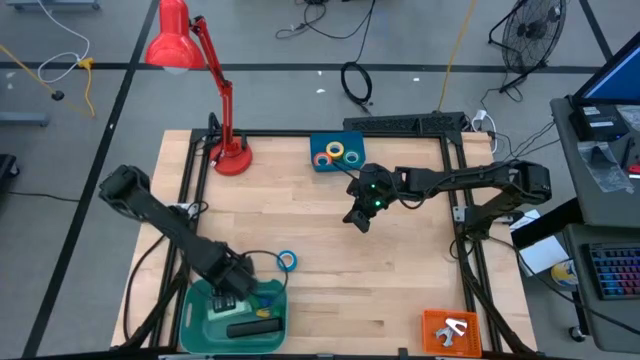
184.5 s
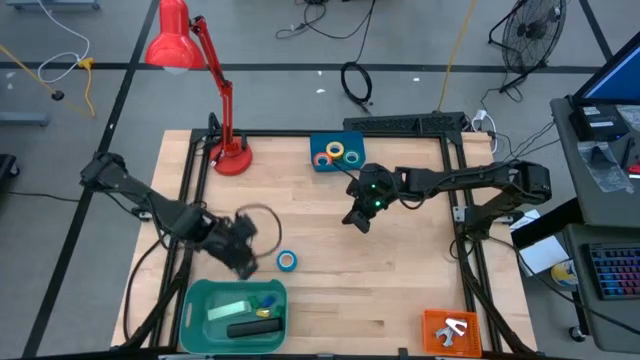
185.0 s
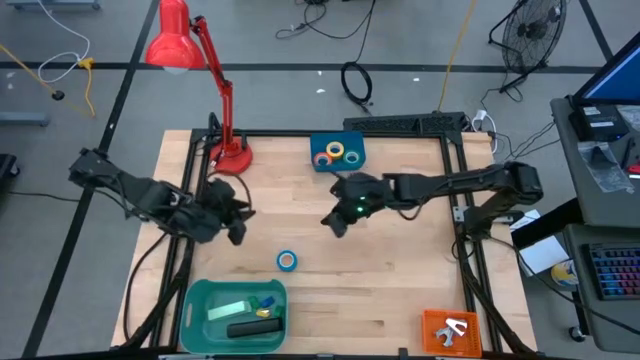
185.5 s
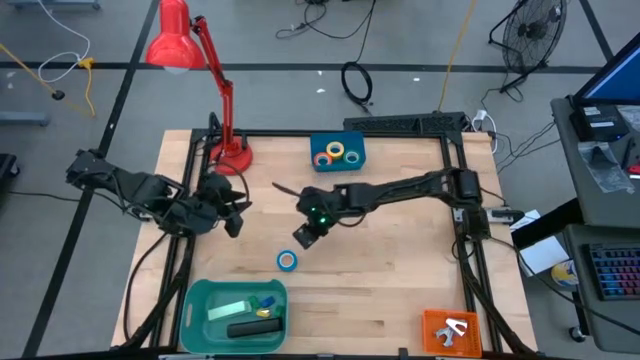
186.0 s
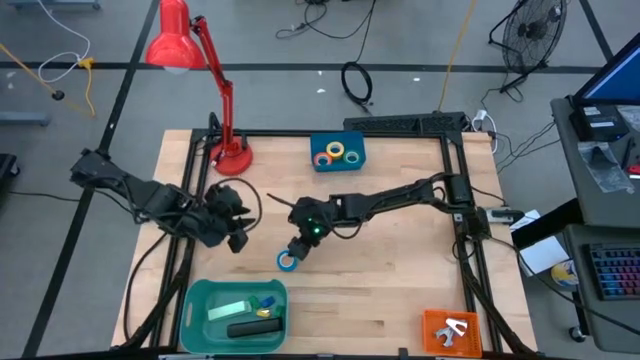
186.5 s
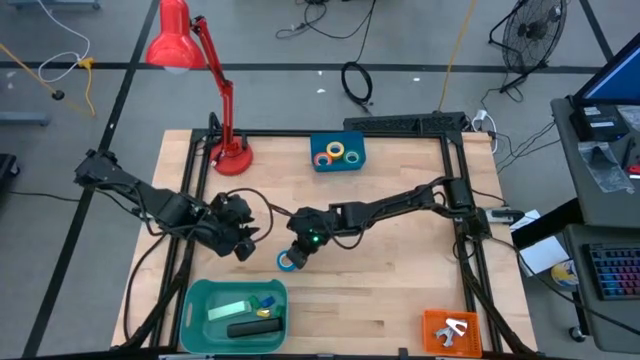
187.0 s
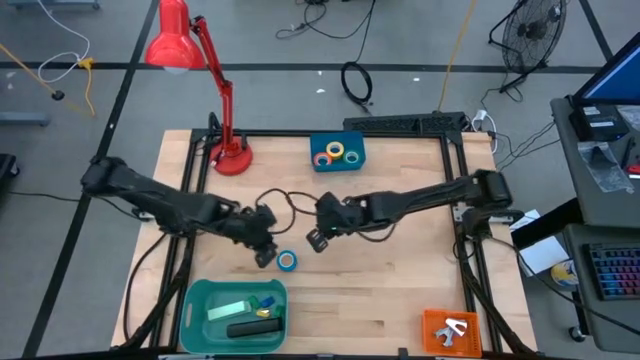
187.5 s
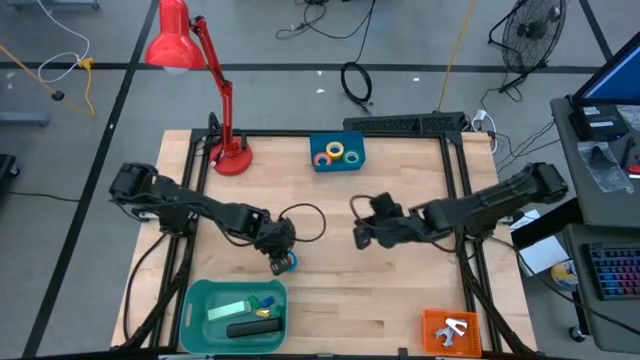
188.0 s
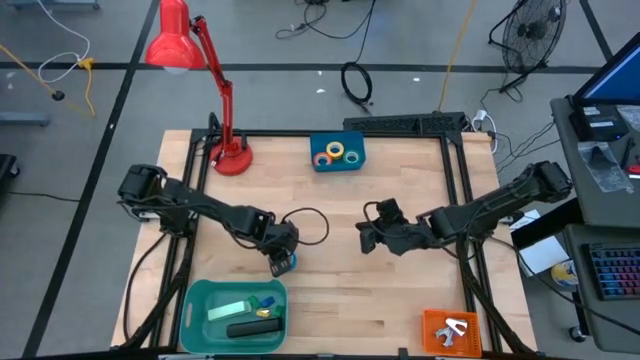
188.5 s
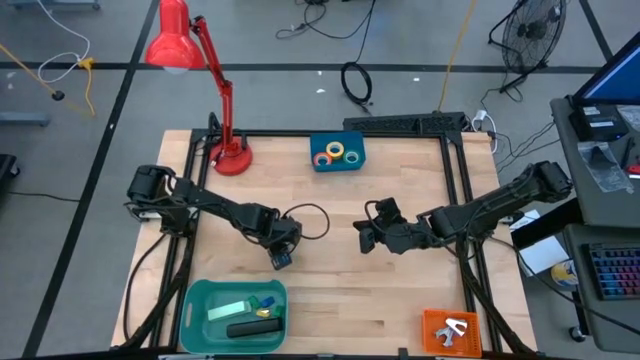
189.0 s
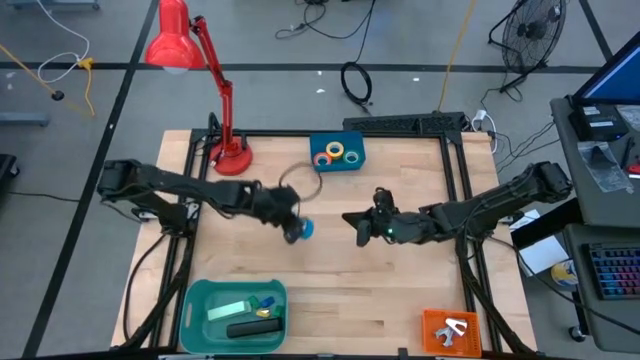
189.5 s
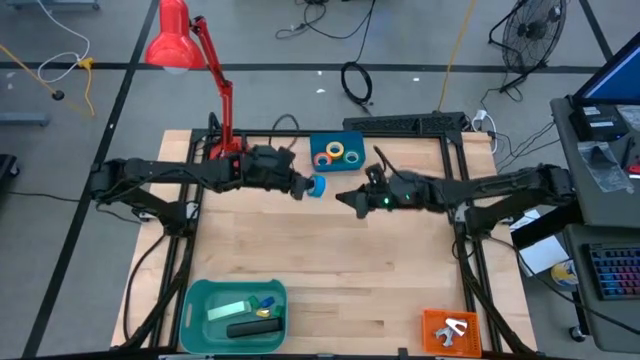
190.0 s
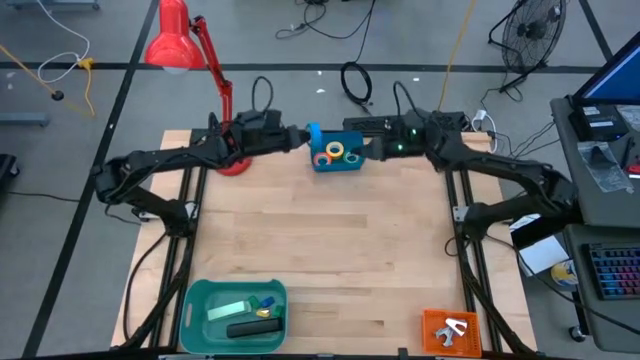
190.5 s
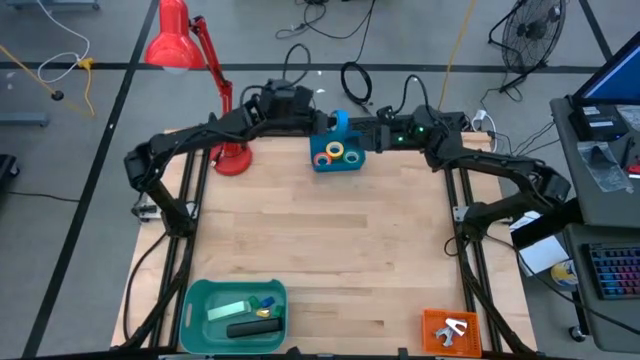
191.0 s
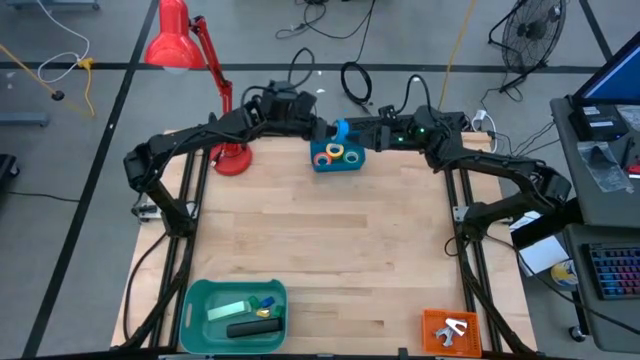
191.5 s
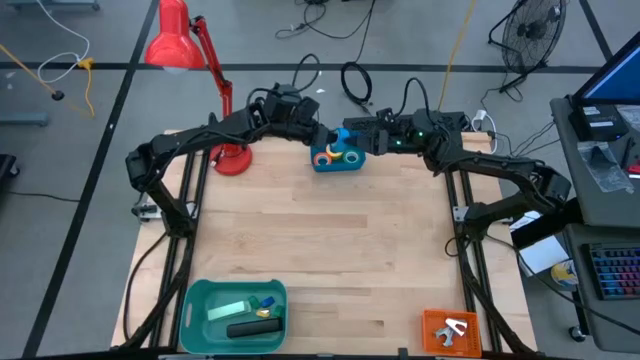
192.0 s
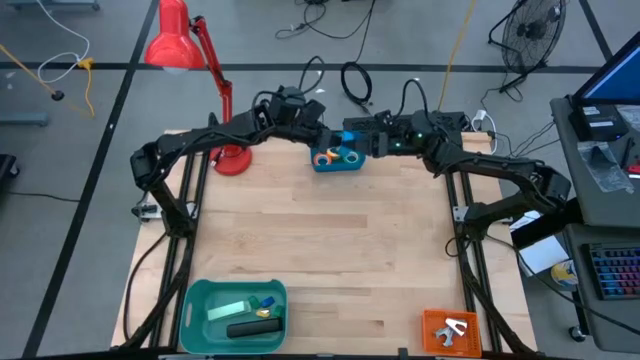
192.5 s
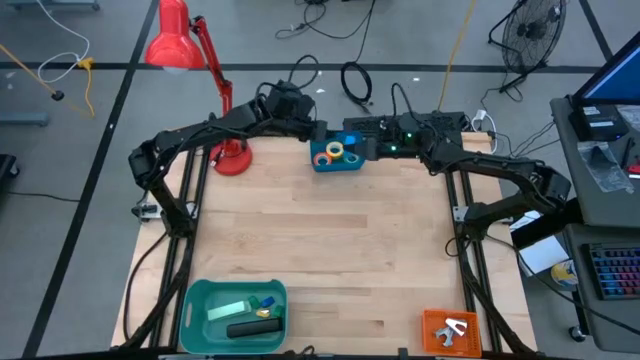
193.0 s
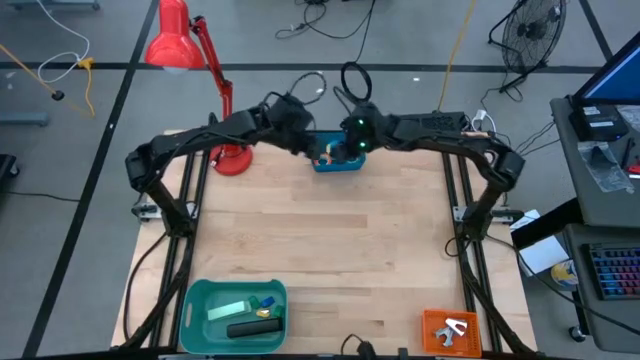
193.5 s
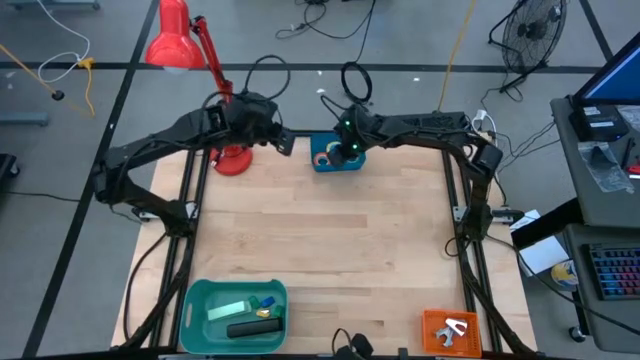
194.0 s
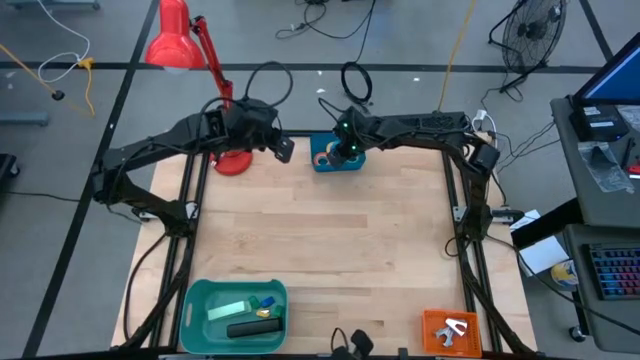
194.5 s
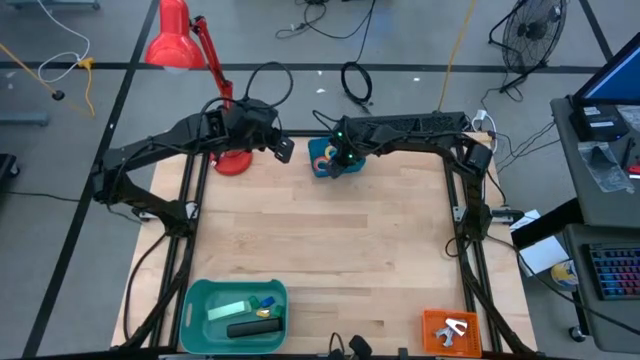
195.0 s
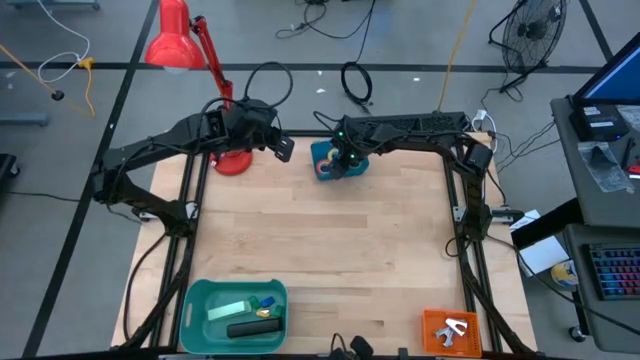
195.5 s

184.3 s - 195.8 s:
Task: Pick and place Stapler, Stapler remover, tape
Put the blue tape into the blue bin

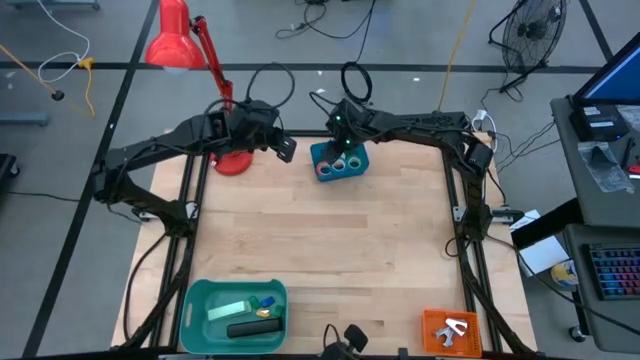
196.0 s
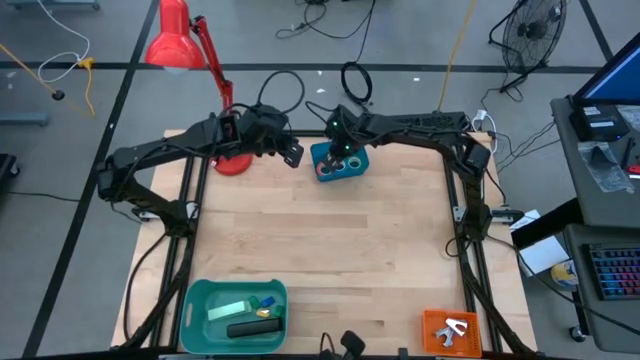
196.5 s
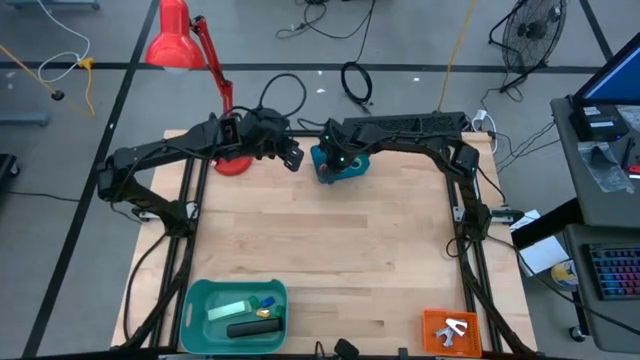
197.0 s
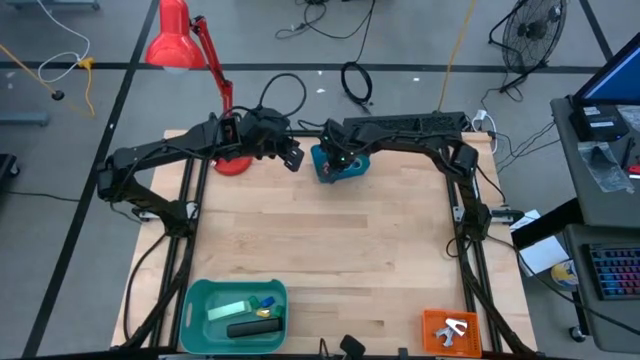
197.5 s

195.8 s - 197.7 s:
Adjust the tapes on the bin

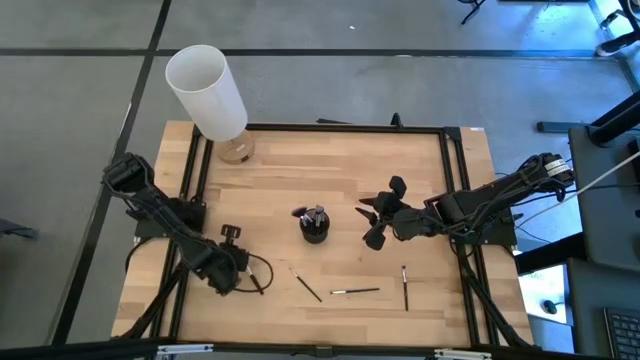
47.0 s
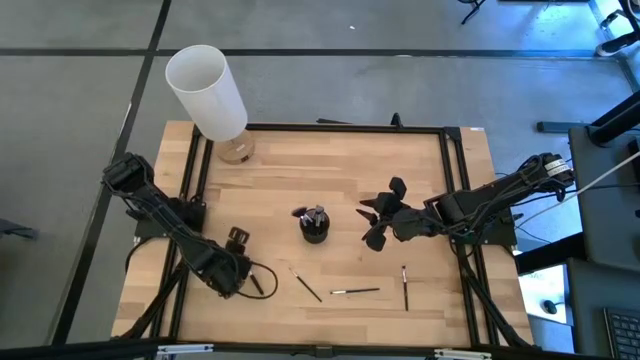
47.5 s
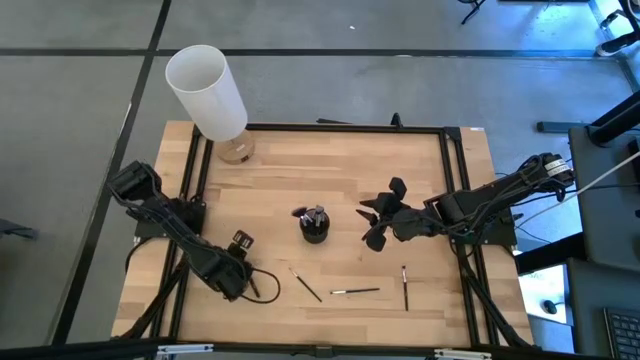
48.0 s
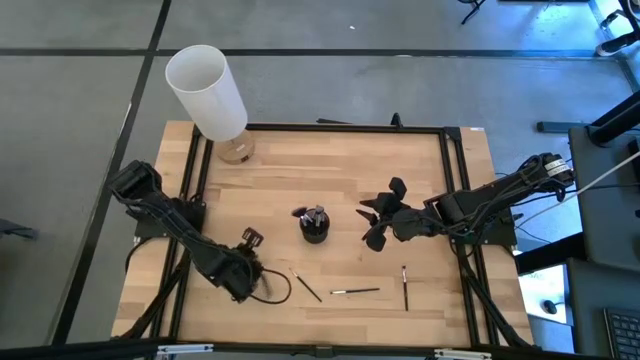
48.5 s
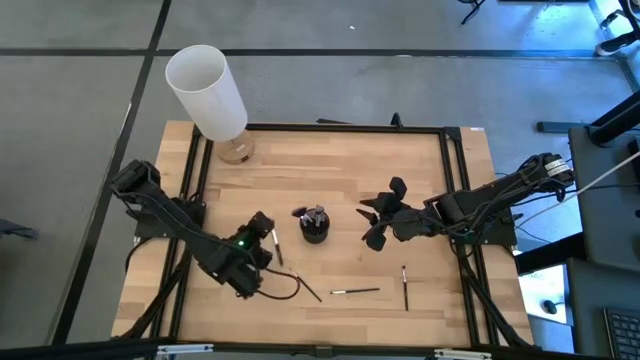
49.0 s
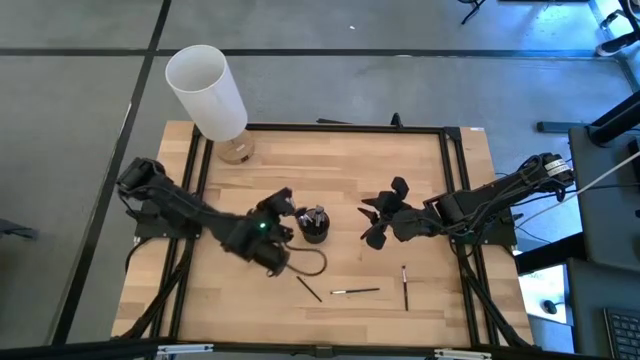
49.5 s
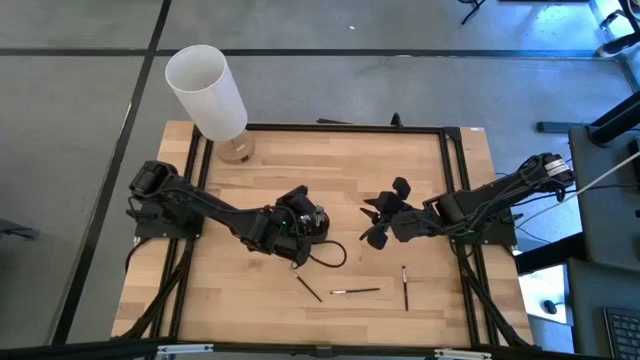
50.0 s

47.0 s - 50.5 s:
Task: Sort items
Put the silver powder brush into the pen holder

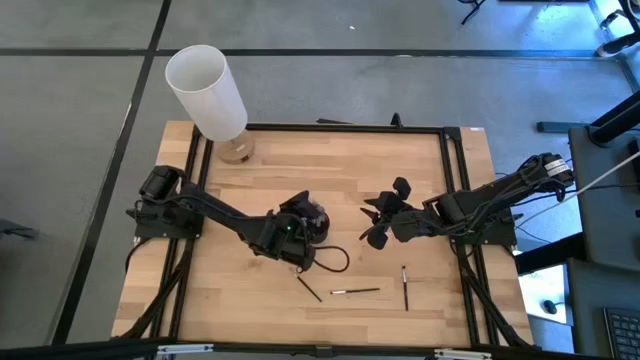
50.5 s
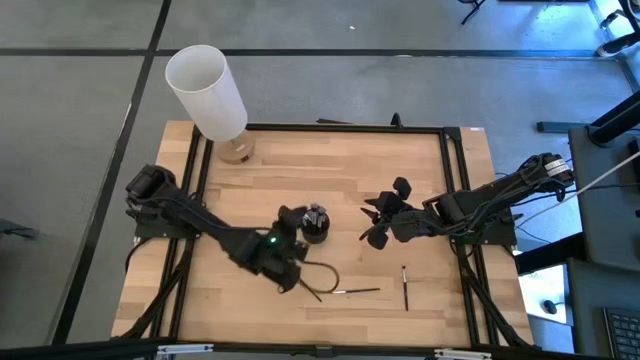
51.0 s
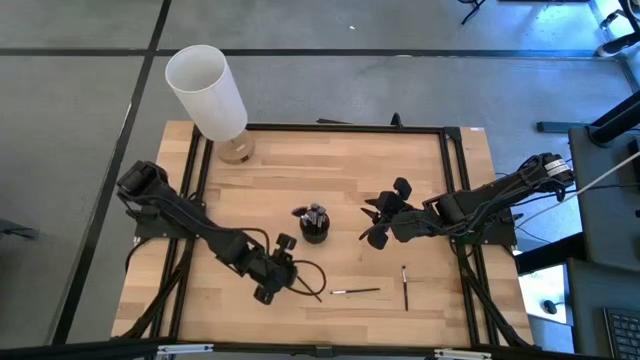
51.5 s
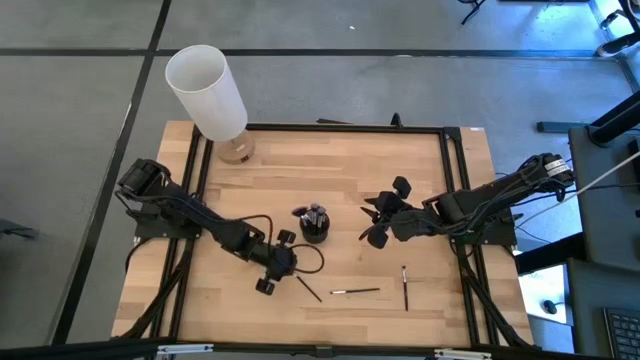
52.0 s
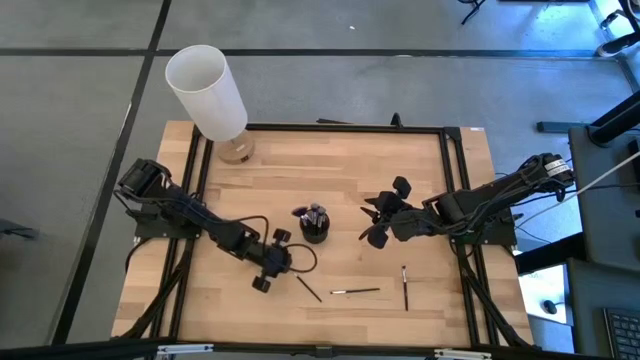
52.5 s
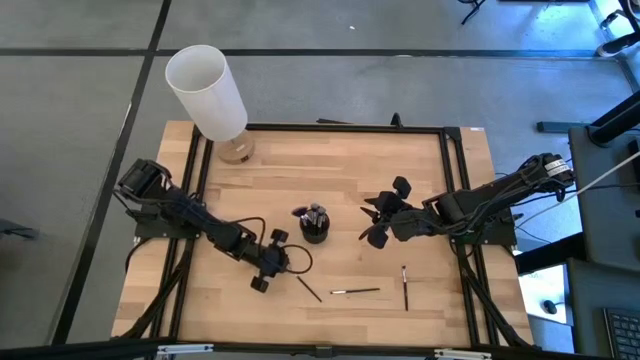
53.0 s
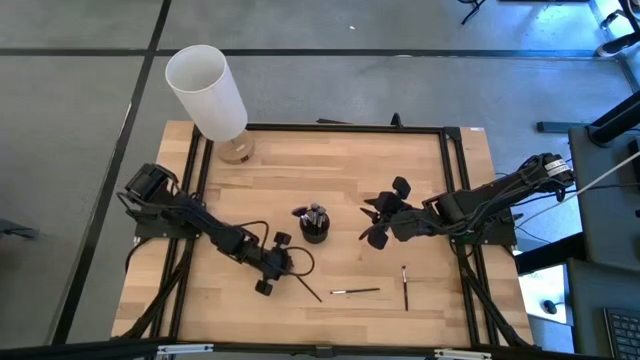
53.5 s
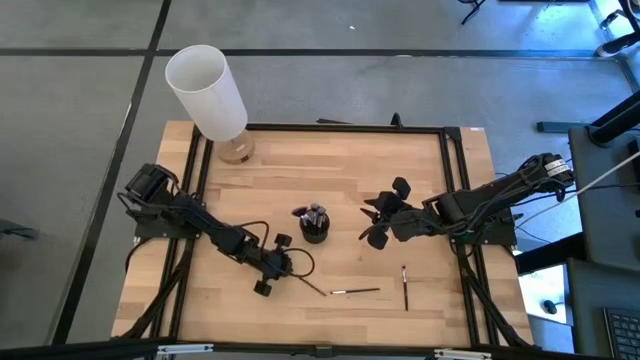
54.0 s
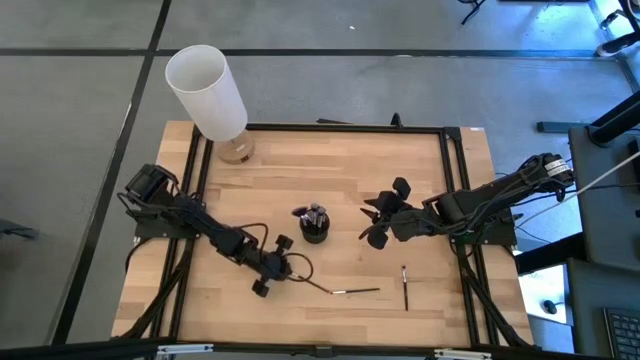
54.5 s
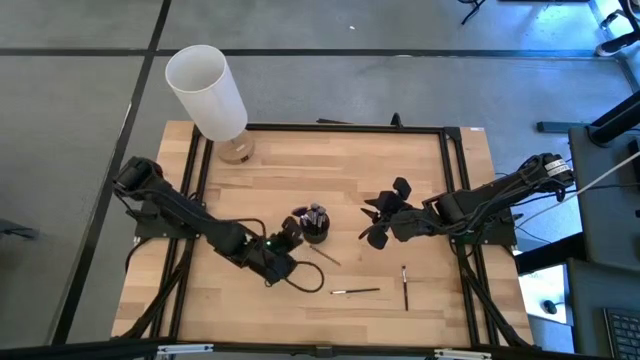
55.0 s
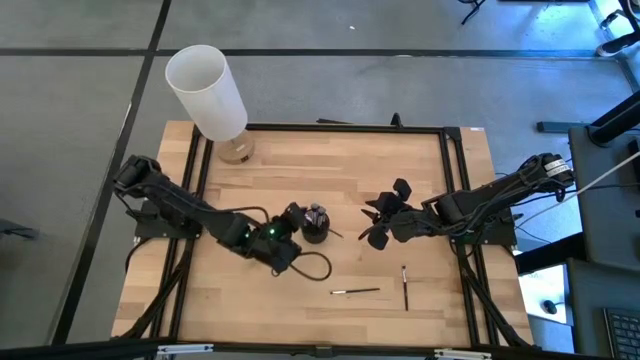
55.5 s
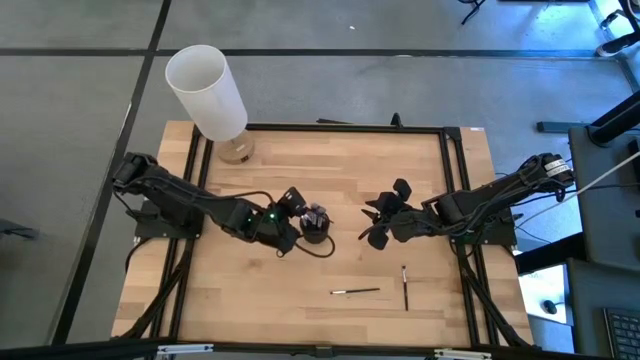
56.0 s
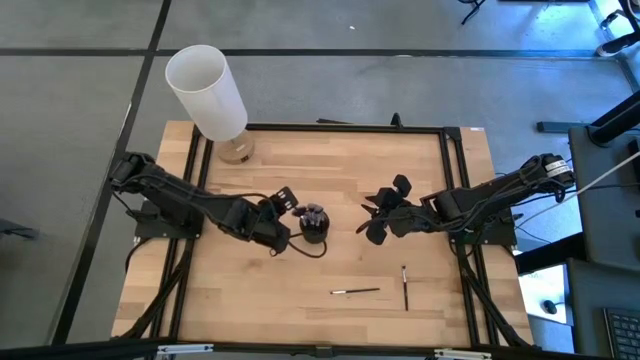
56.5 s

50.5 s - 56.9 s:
Put the silver liner brush into the pen holder
